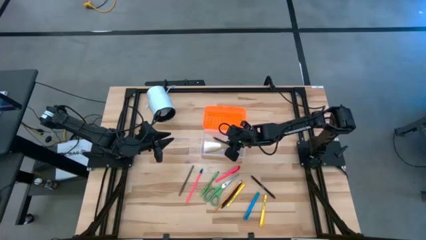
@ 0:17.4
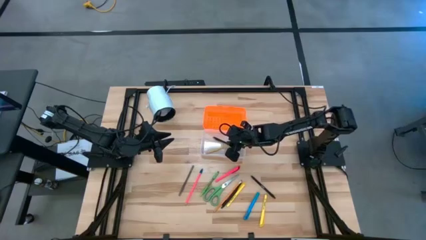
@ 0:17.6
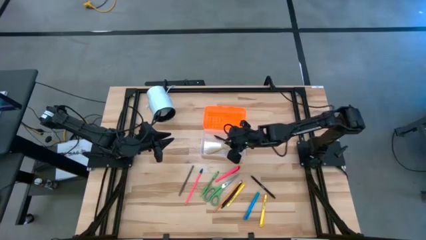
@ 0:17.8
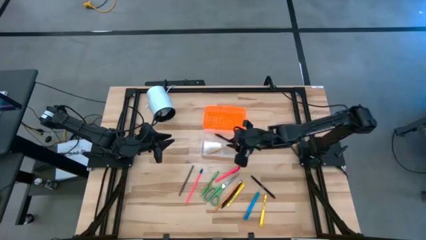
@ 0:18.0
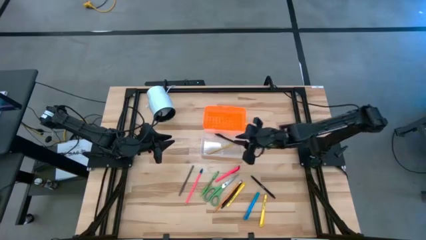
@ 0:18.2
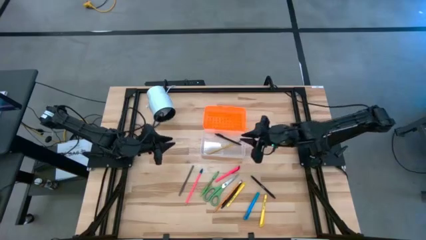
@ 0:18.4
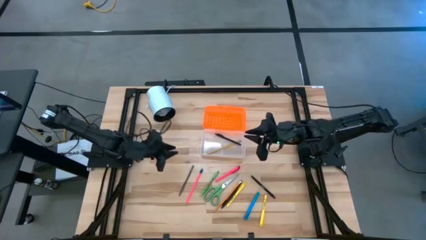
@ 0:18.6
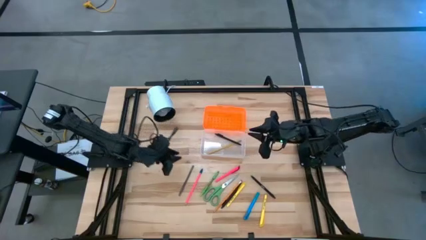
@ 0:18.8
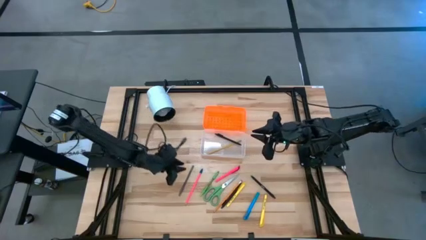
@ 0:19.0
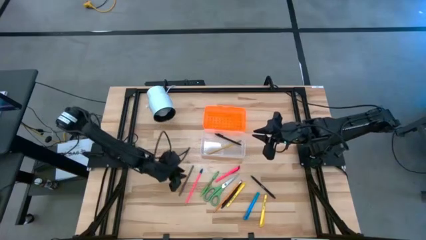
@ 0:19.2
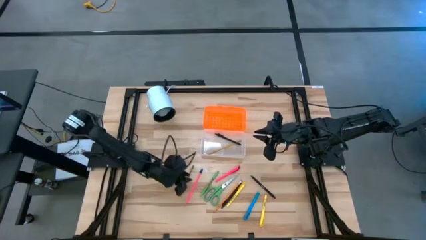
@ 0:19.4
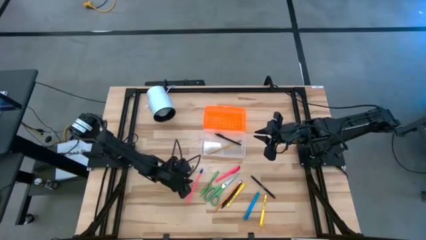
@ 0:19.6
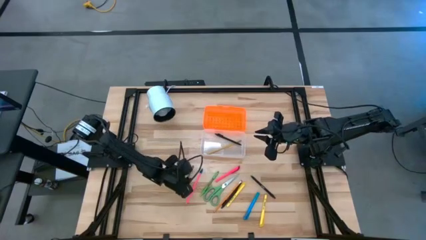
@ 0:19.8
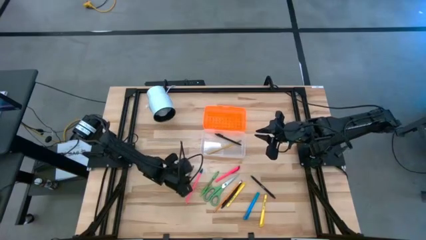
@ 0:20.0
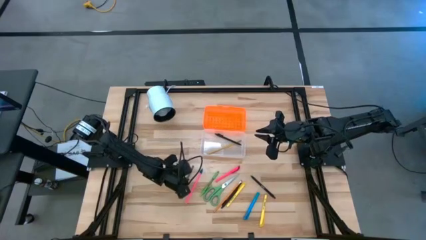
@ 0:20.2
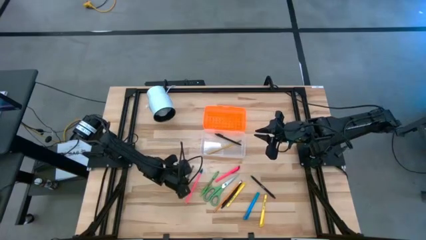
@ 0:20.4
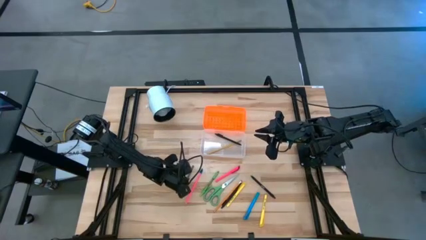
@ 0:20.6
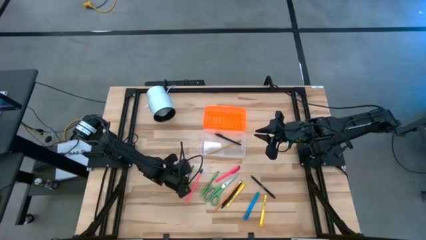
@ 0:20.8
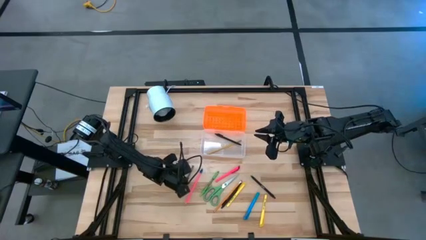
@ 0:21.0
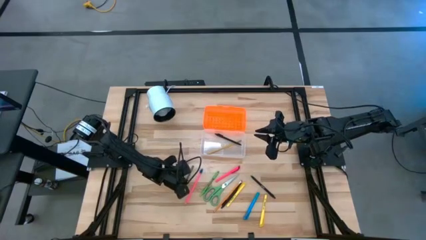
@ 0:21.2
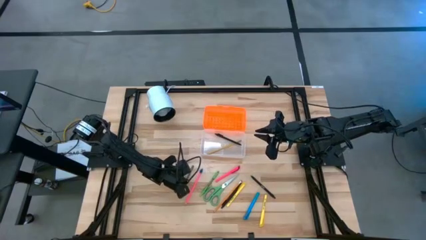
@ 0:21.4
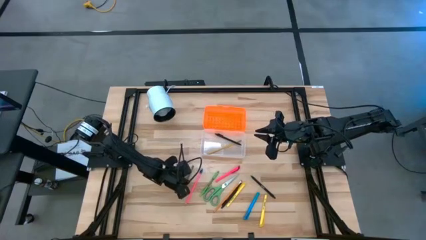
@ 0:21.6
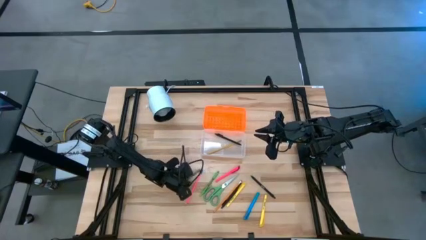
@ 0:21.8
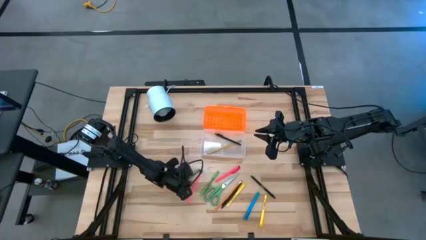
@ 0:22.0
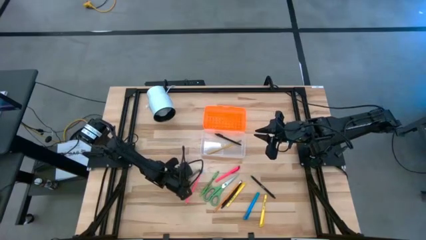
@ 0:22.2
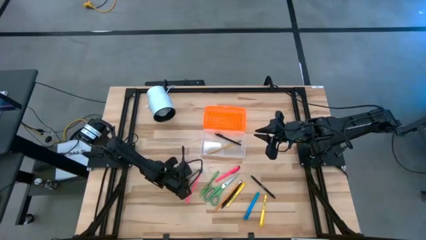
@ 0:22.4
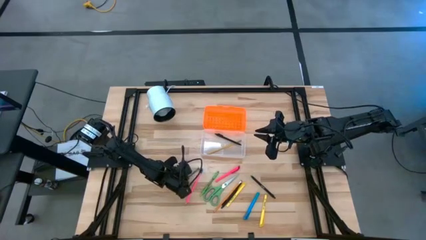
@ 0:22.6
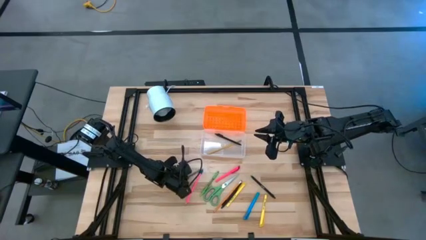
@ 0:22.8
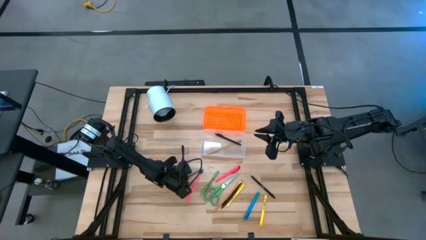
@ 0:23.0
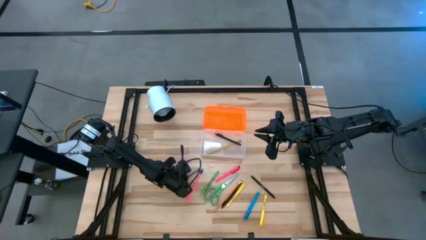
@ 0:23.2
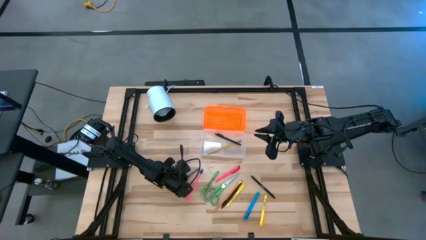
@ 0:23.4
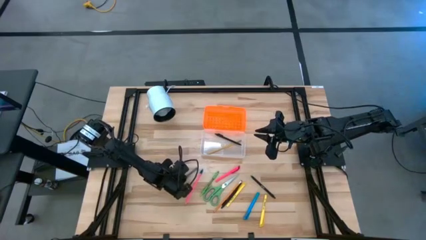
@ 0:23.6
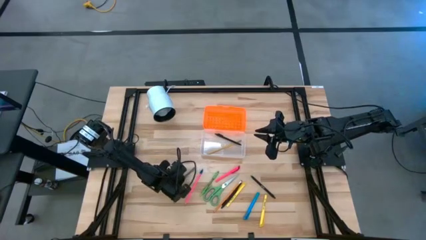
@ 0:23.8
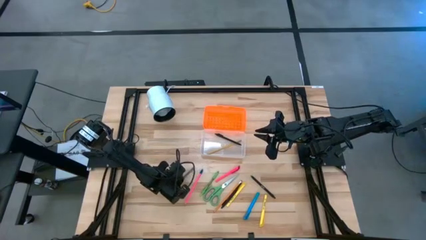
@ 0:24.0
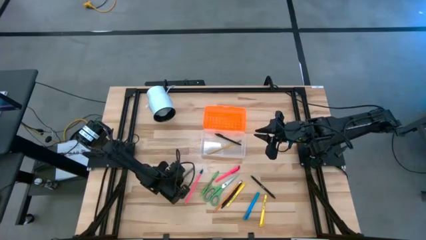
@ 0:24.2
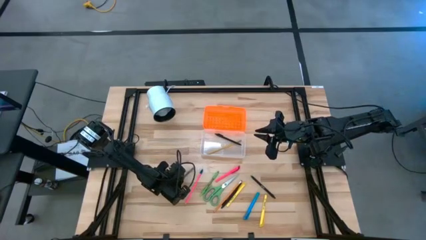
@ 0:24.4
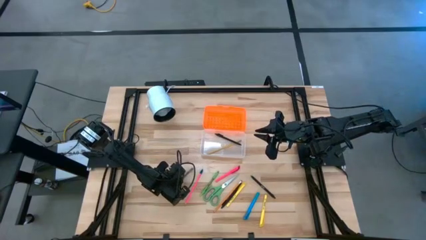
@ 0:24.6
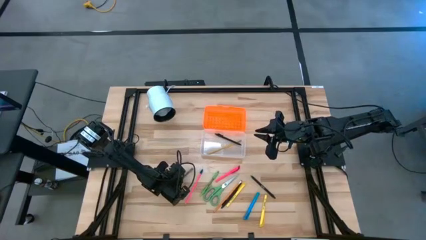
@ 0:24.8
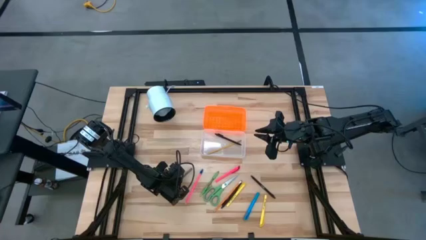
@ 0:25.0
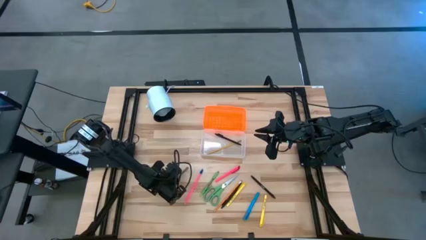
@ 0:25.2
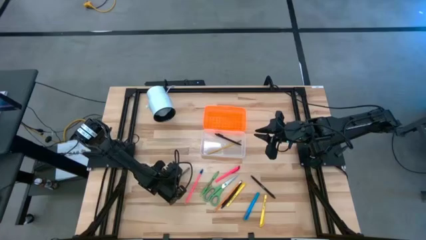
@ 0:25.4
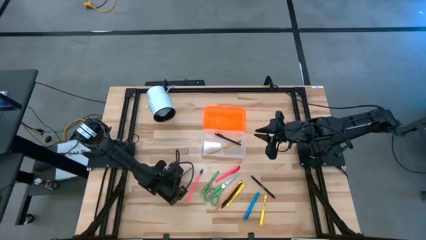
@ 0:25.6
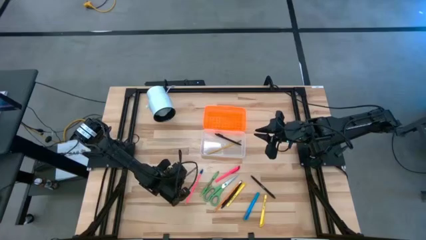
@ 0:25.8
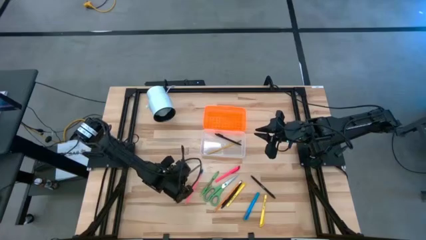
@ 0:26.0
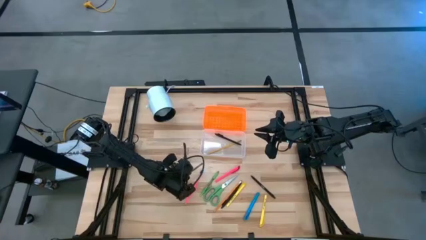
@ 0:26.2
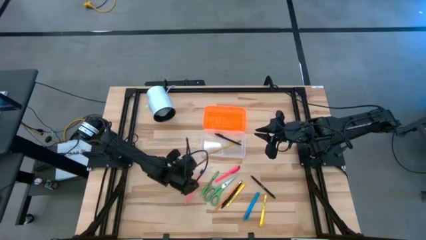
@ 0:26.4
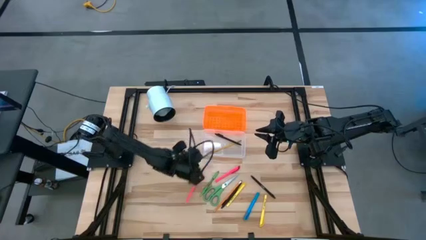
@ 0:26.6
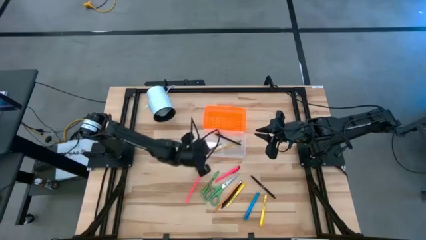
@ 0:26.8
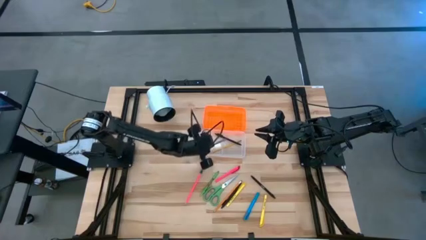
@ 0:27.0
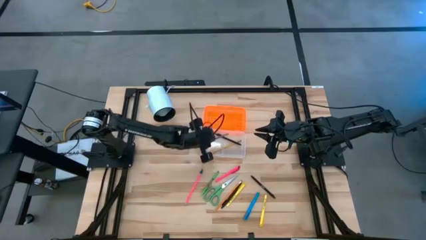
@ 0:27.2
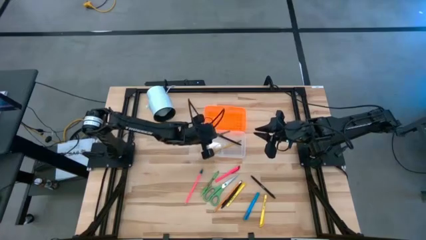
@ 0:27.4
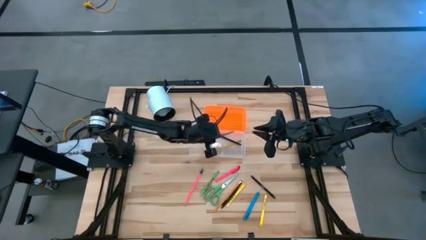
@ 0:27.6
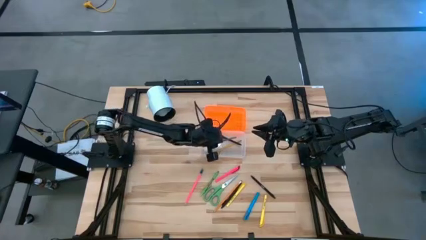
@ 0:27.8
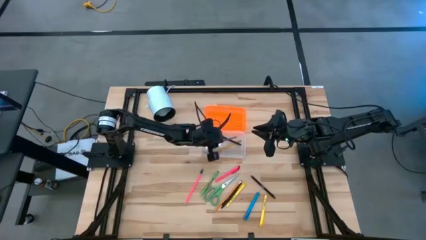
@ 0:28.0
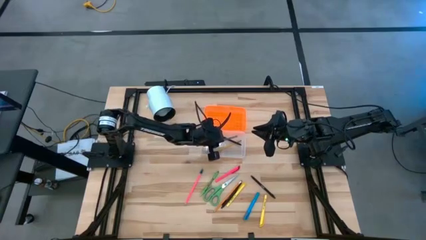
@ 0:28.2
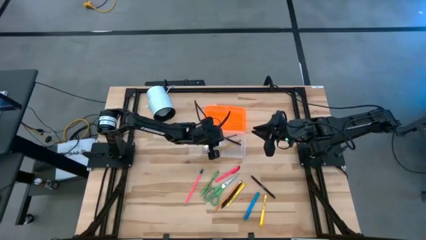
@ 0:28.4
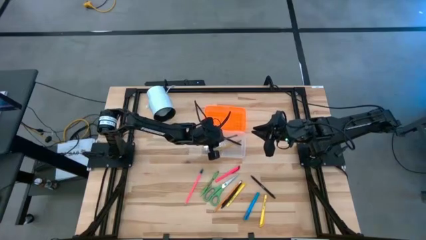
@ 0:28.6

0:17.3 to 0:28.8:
Task: Pick & place school supplies into a supply box
Put the gray pen into the orange supply box
